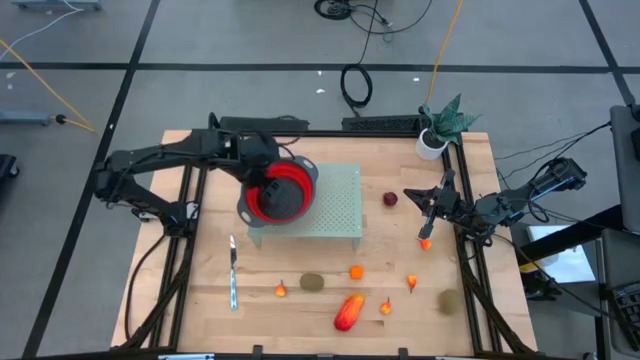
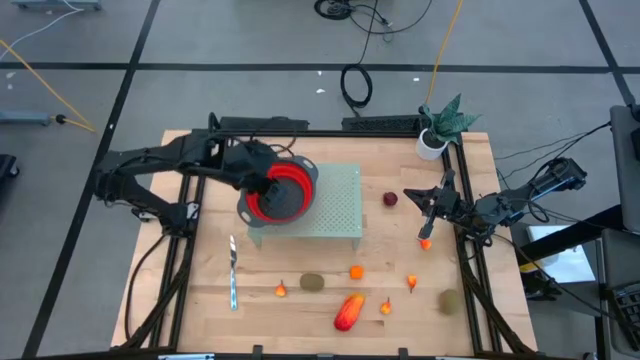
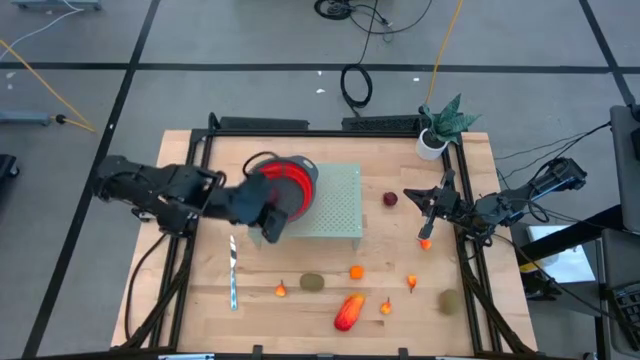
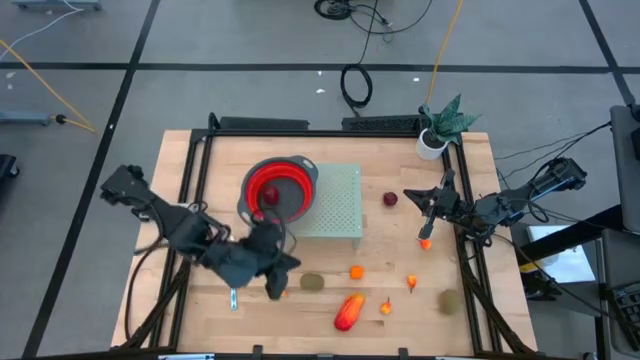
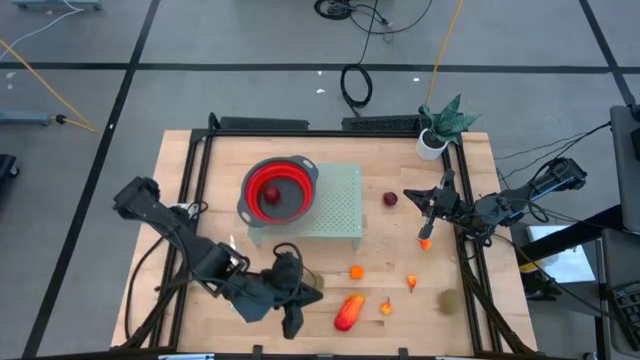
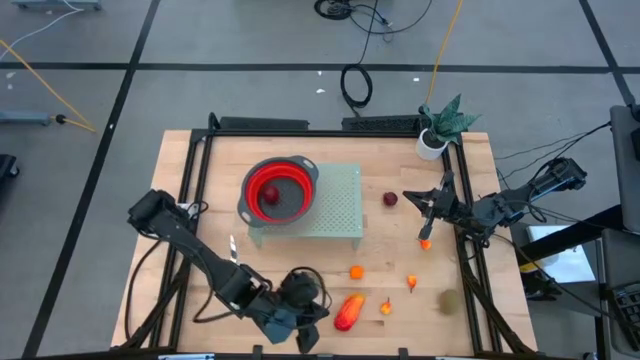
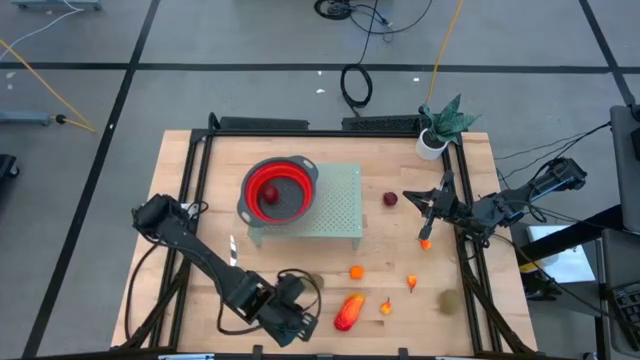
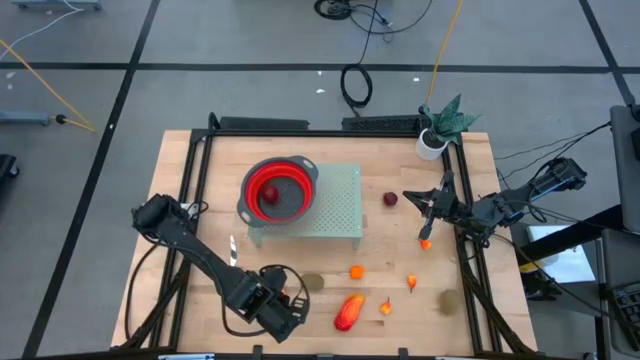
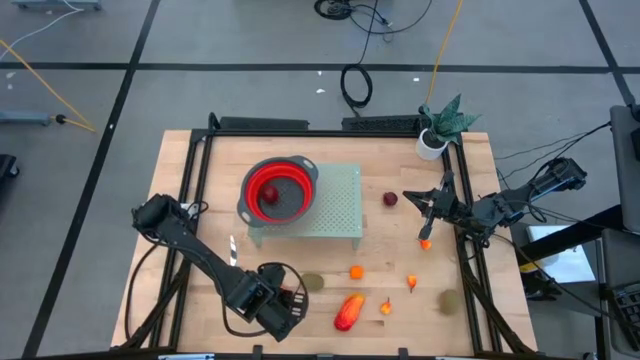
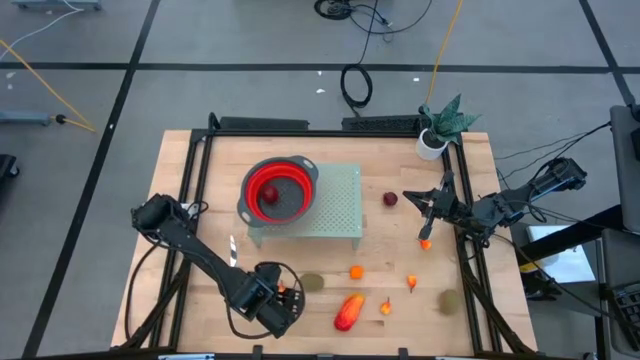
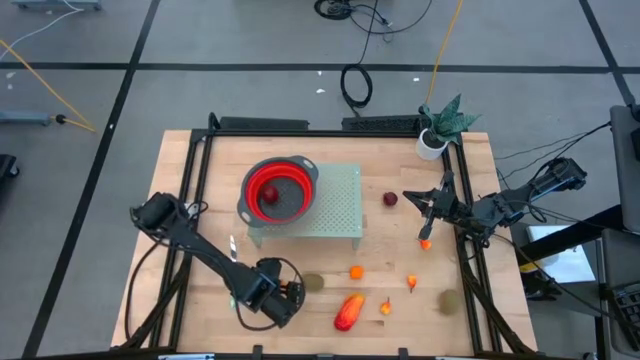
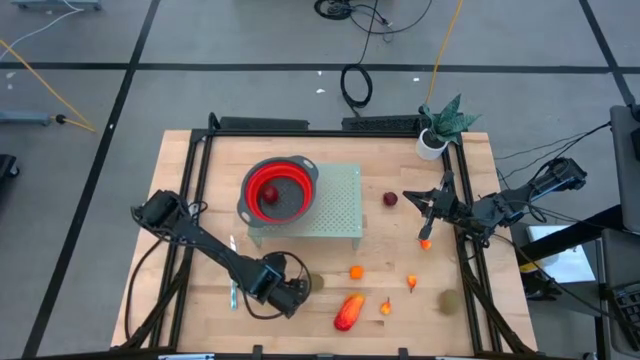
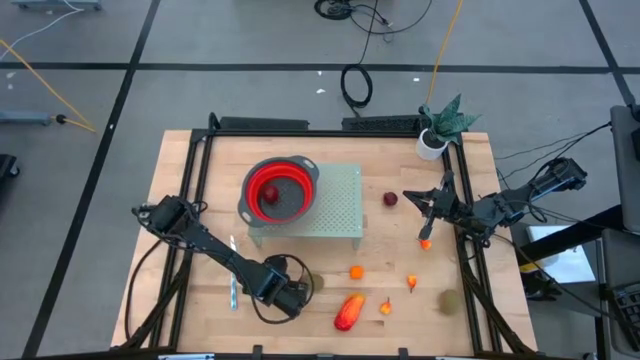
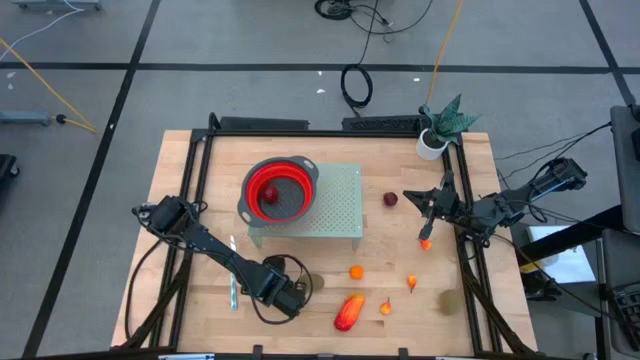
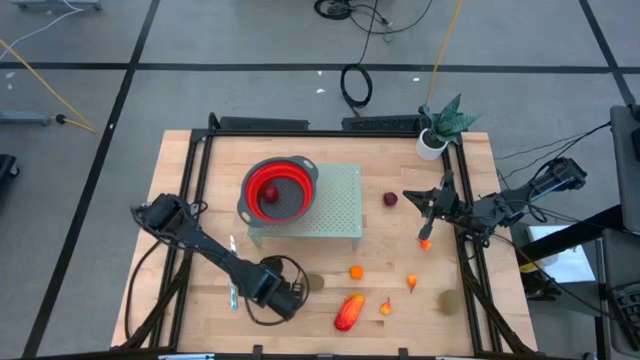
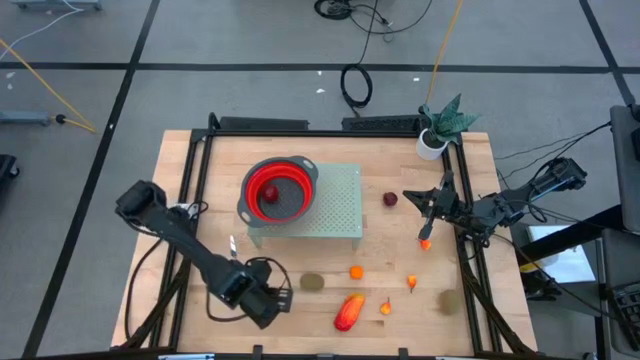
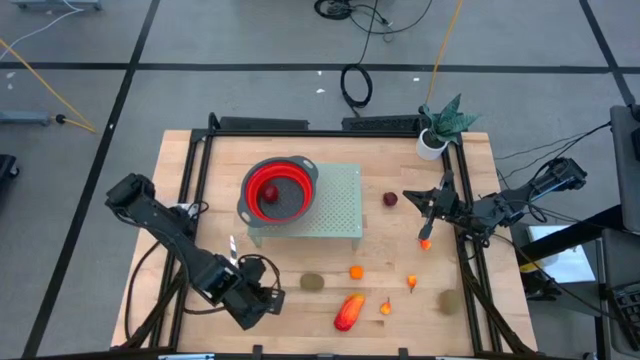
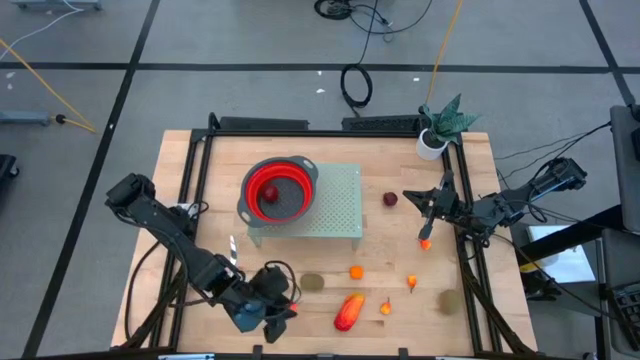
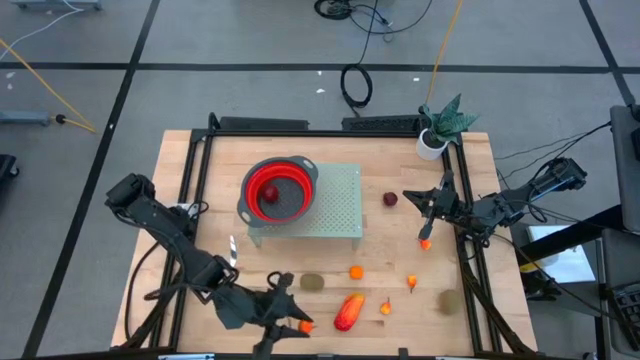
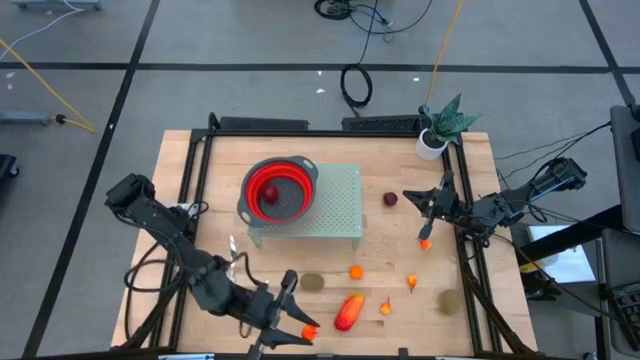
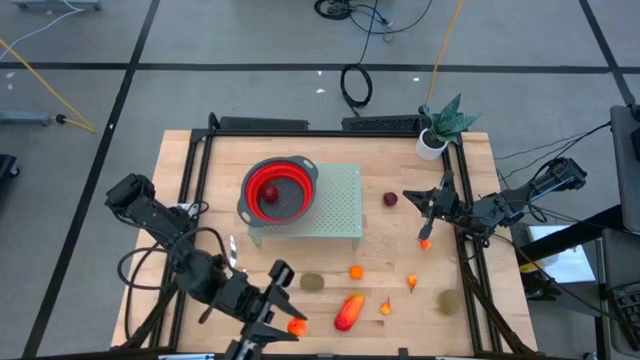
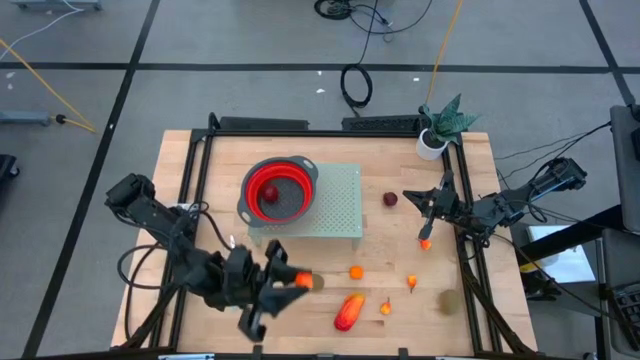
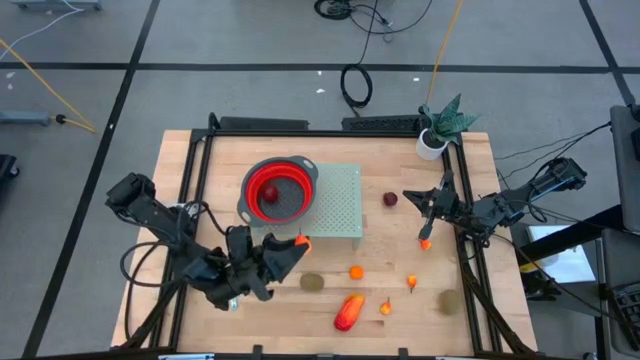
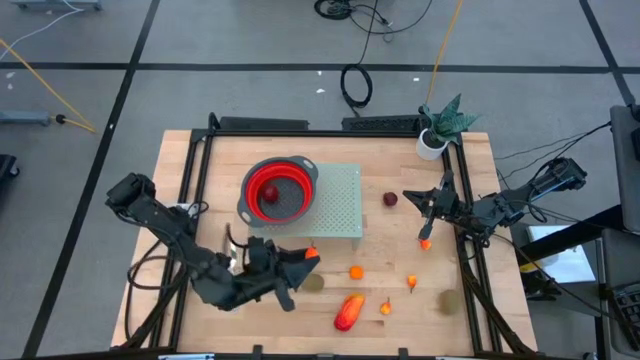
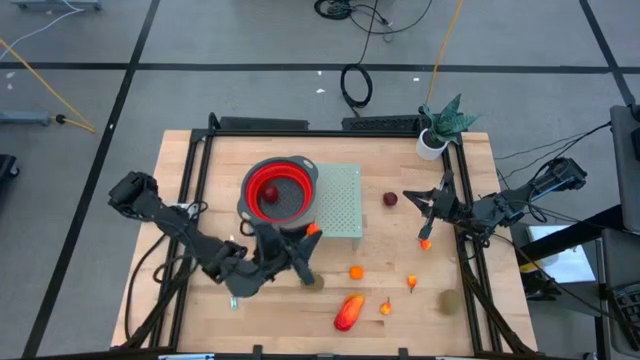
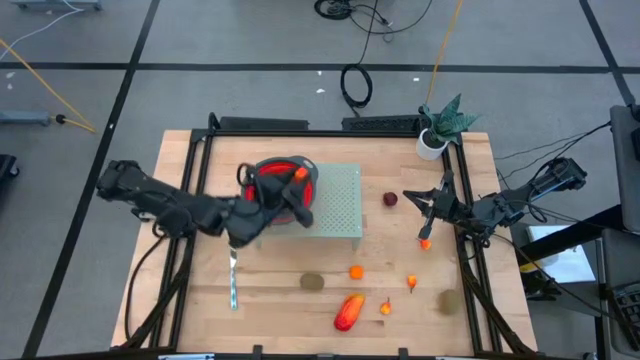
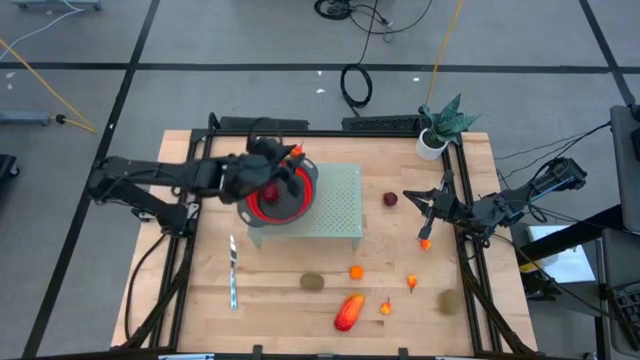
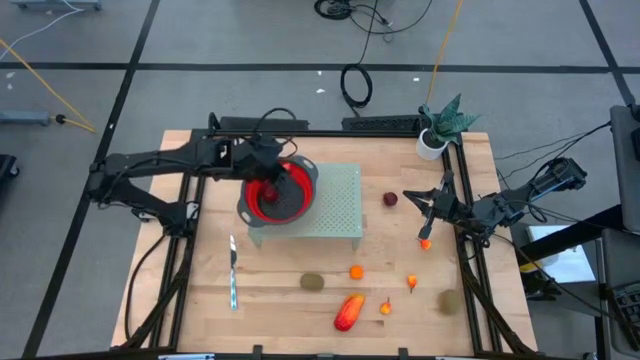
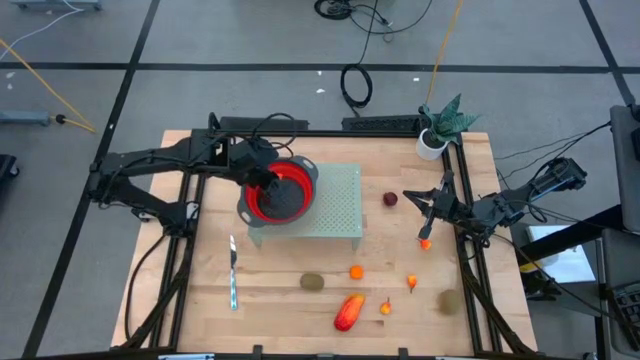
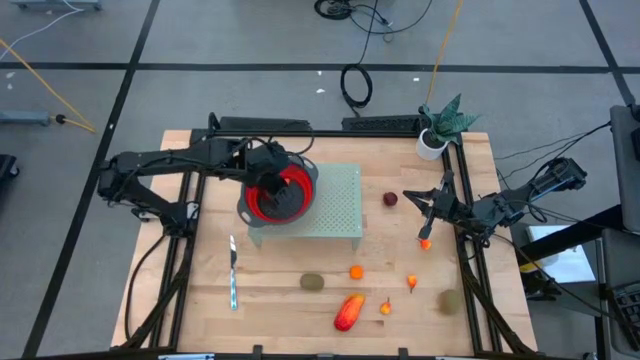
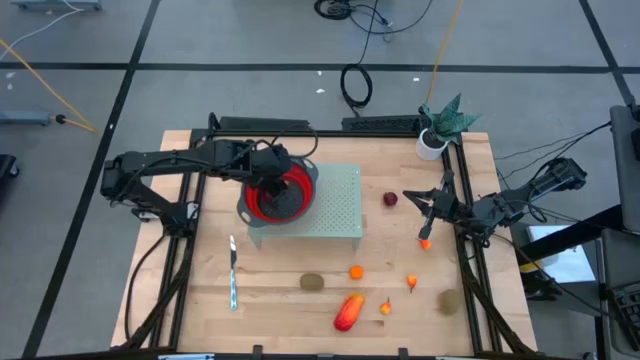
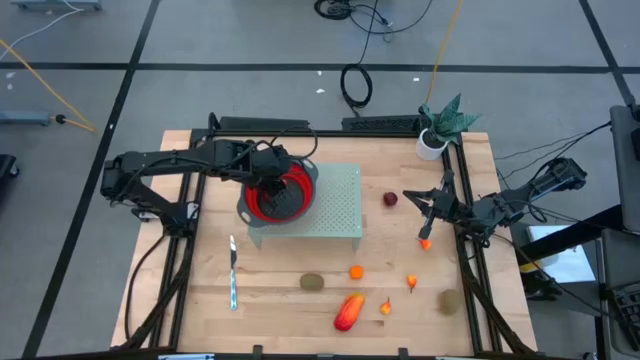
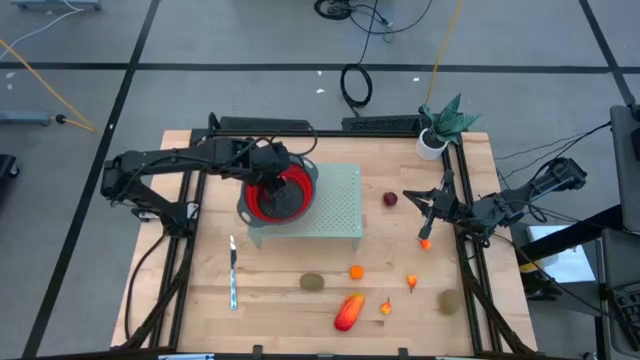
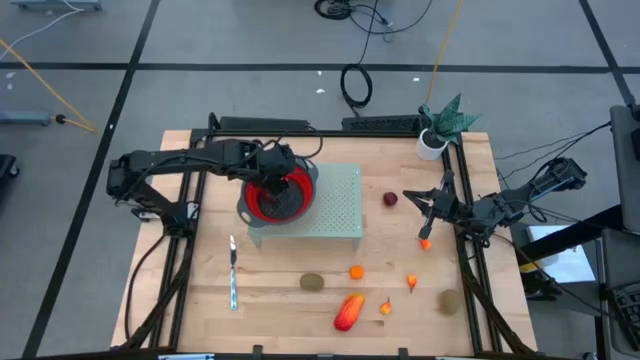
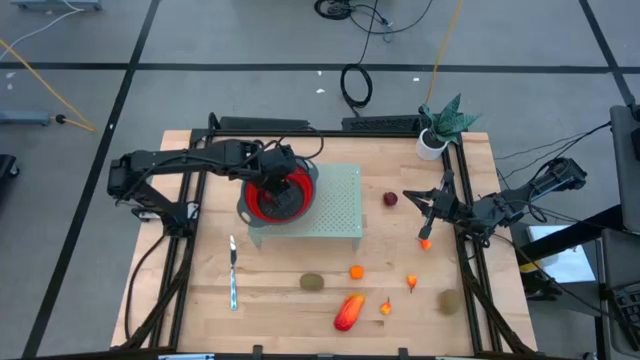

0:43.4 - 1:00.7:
Task: Pick & Place Fruit
Put the left peach into the strainer bowl on the shelf

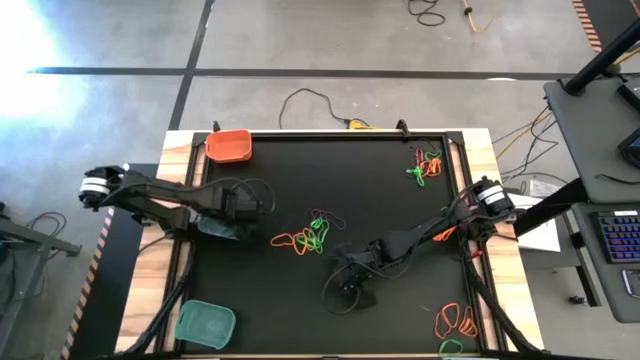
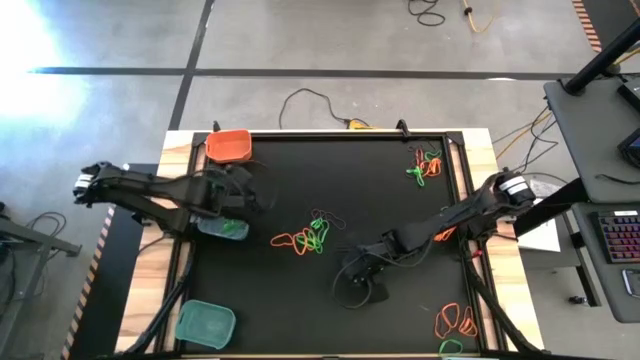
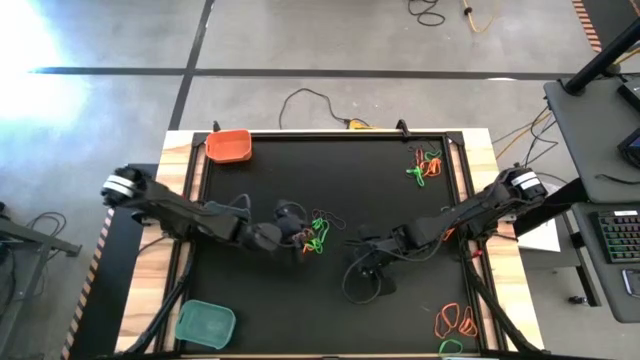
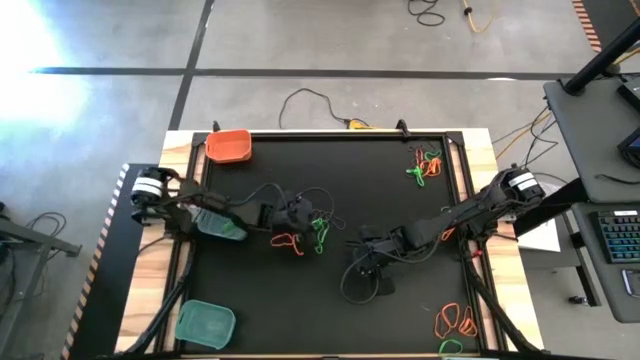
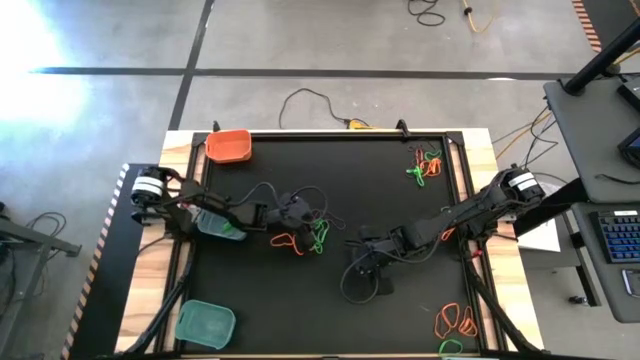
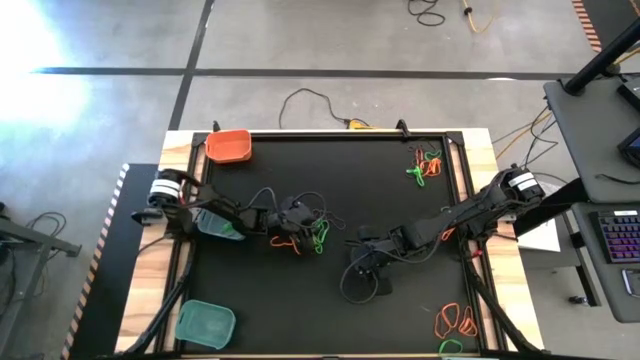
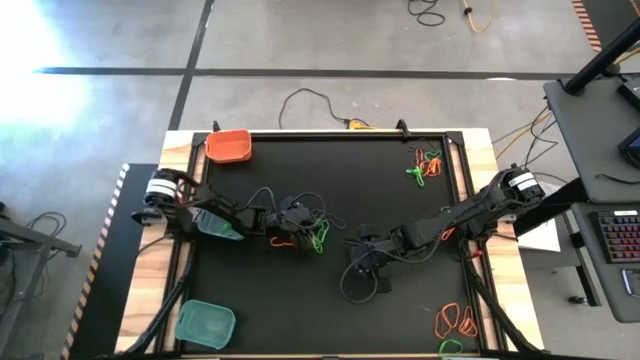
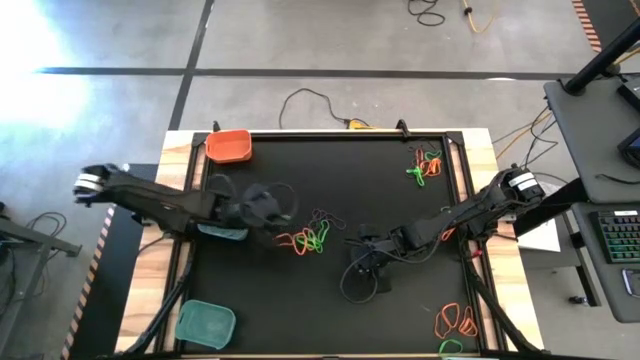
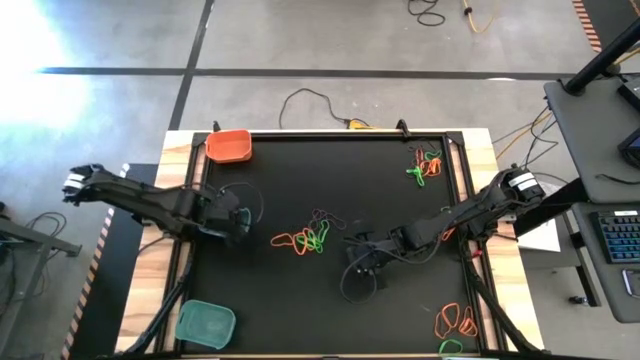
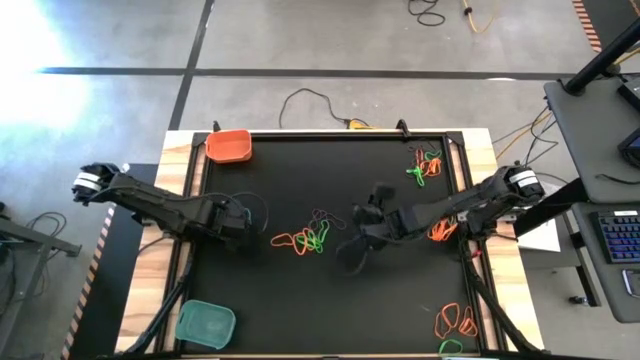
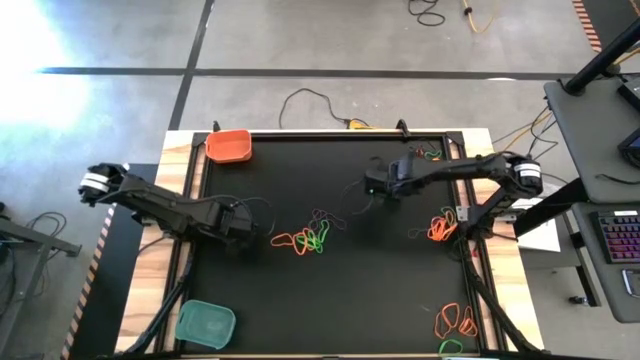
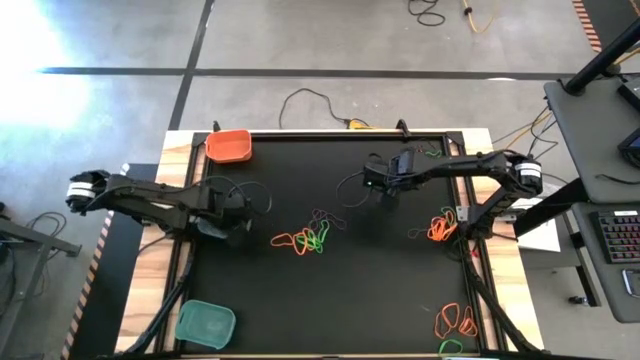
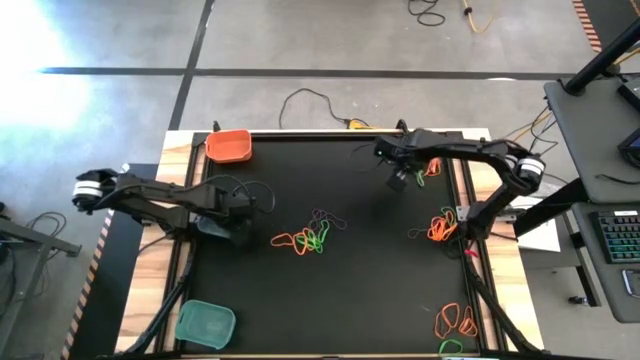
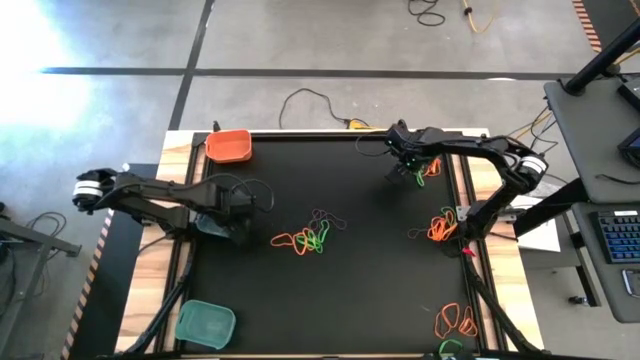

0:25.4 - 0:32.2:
Task: Sort rubber bands into baskets
Put the green rubber band into the blue bin
